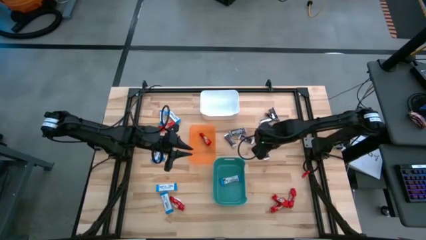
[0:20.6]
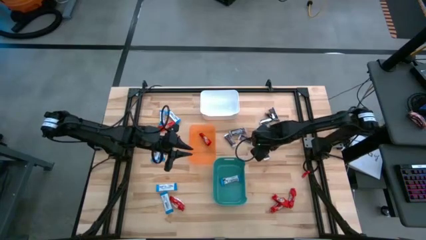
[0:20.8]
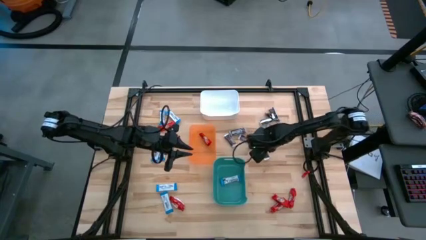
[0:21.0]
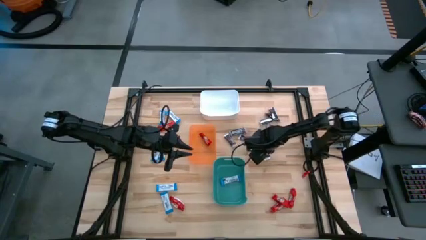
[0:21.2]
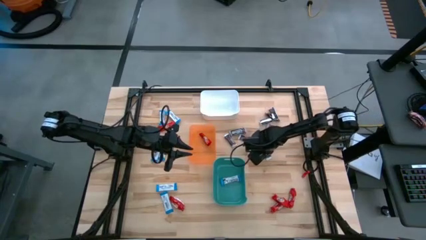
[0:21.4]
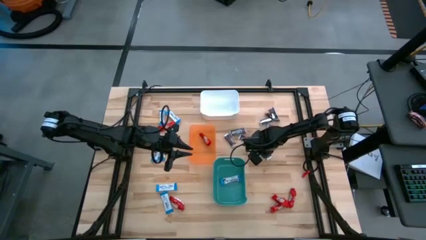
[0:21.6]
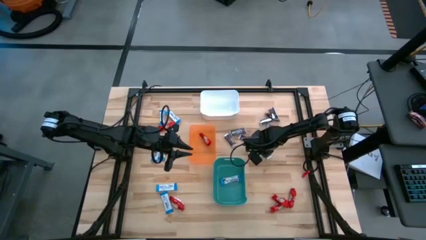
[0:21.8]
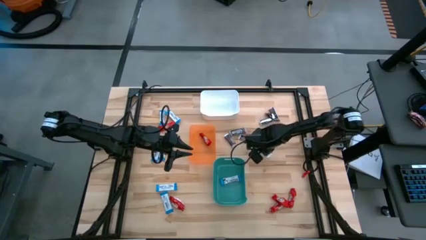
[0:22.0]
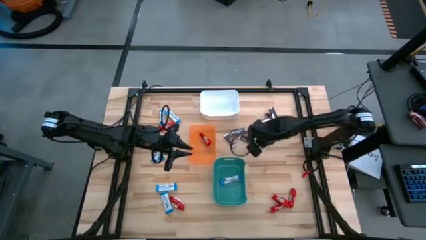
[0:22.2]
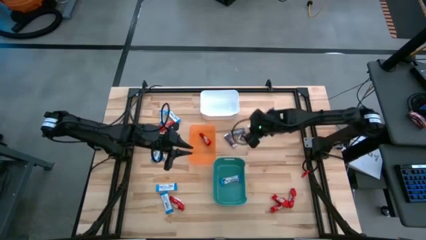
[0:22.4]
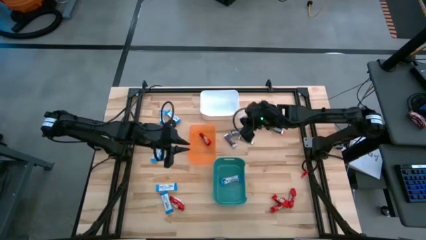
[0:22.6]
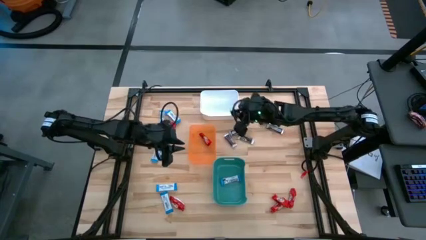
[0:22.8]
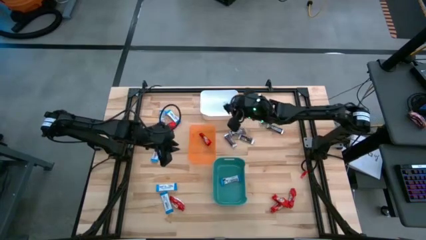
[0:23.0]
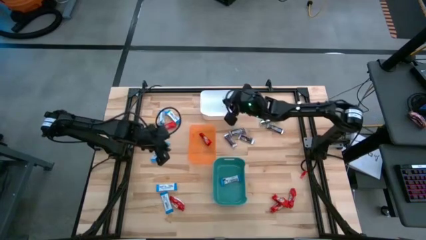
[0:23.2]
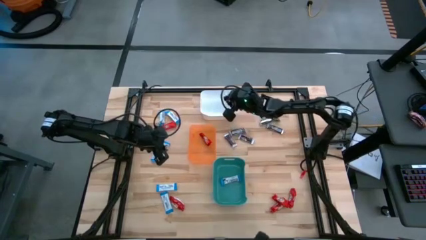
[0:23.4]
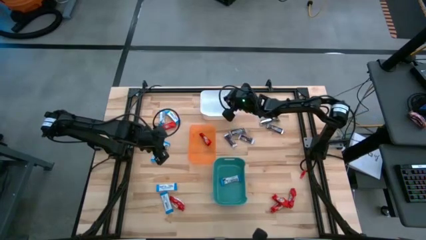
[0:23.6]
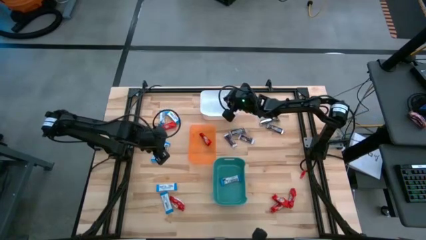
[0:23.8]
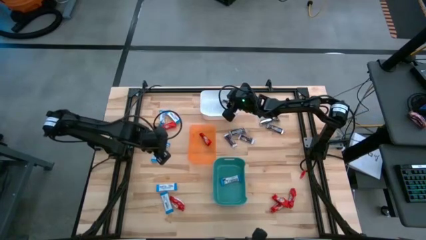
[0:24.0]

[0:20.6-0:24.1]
Task: Sort candy
Put the brown chocolate bar into the white bin

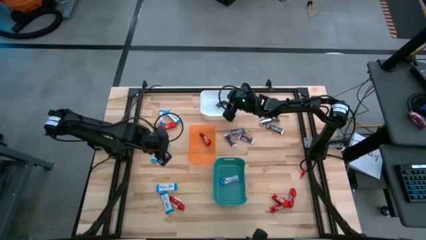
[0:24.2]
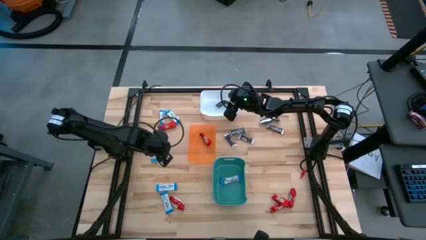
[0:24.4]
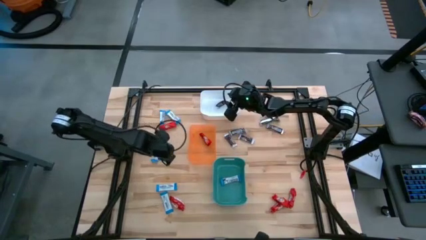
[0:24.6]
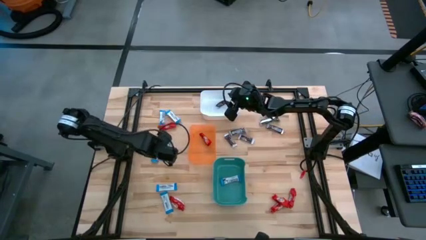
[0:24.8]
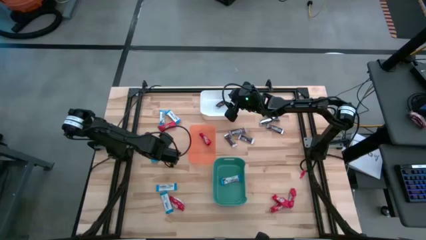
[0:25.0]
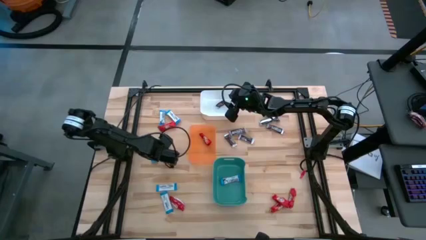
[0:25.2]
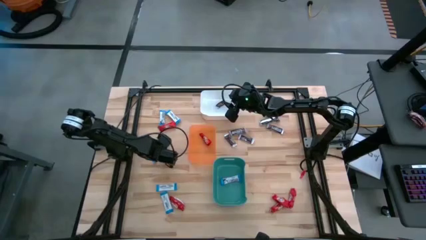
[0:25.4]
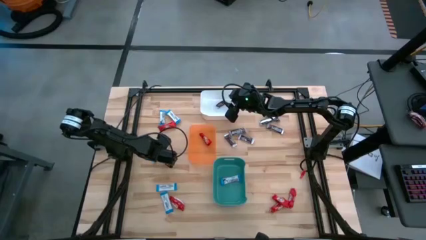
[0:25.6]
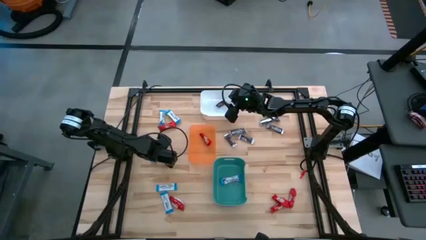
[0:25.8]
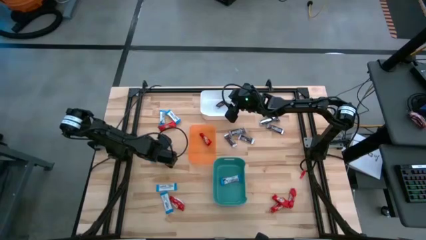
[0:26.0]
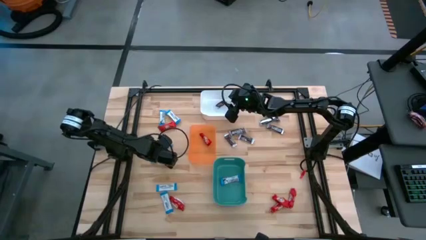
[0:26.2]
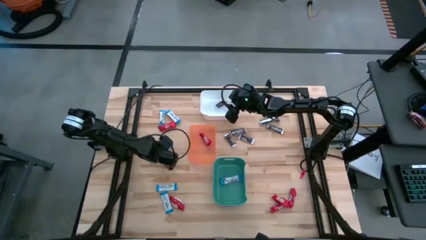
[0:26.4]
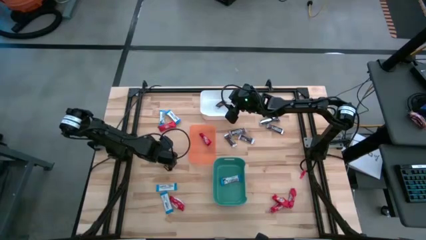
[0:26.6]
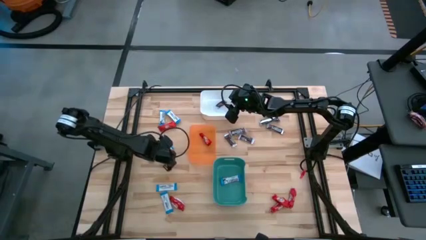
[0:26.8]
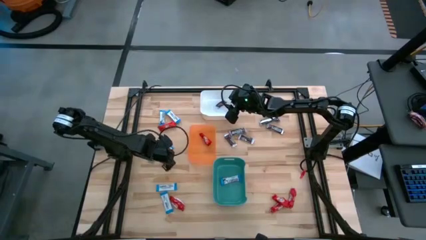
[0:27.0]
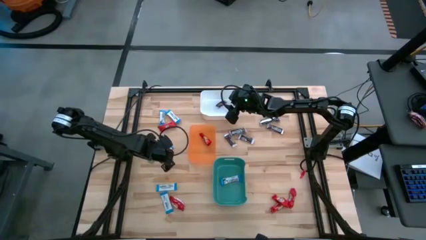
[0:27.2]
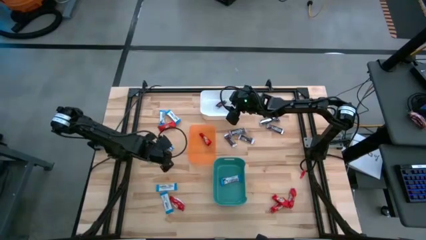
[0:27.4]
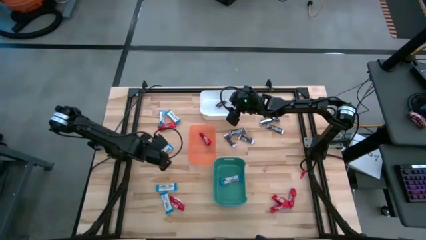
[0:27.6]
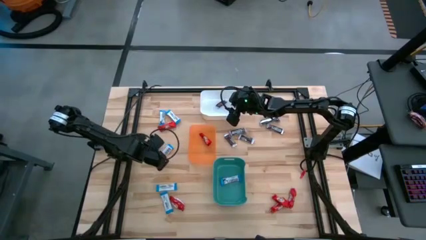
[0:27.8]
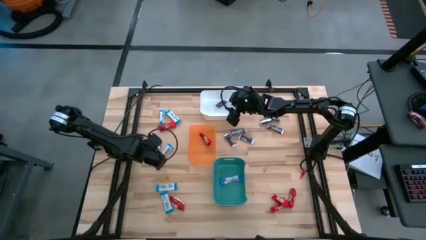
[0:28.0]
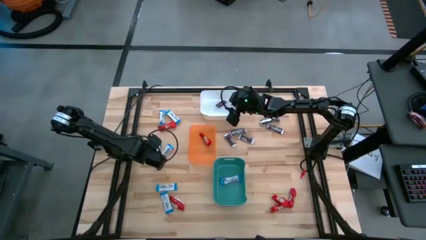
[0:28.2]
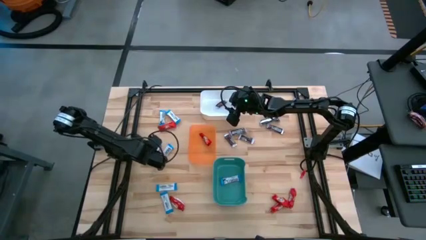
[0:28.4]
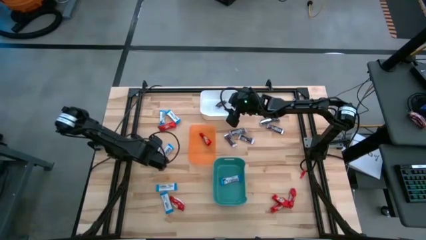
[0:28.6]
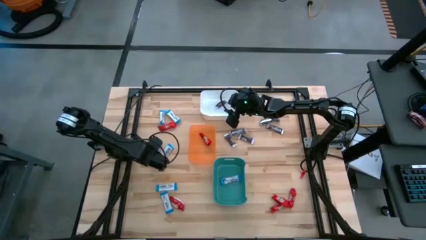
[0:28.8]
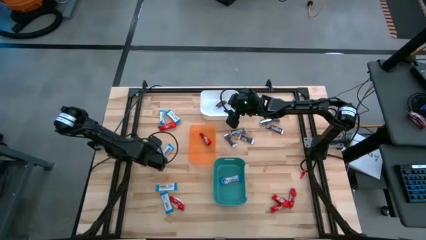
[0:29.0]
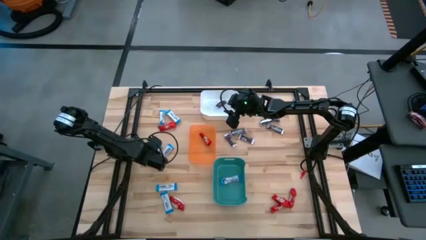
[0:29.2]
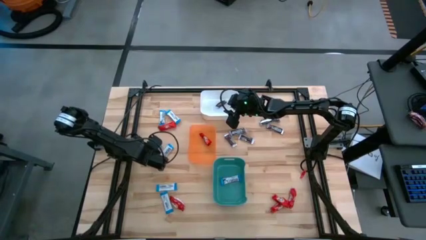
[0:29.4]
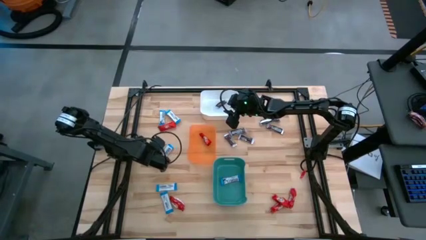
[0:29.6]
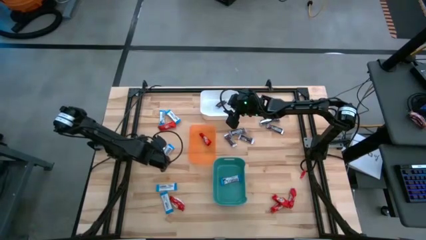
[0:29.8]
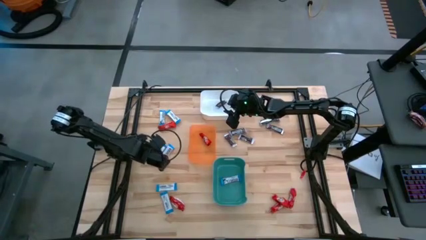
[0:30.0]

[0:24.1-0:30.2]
Put the white chocolate bar into the green bin

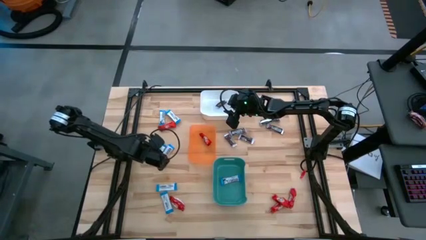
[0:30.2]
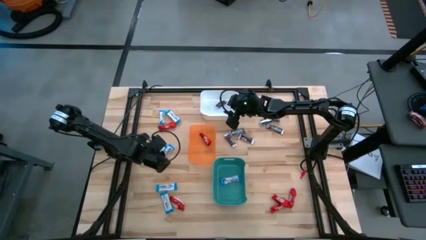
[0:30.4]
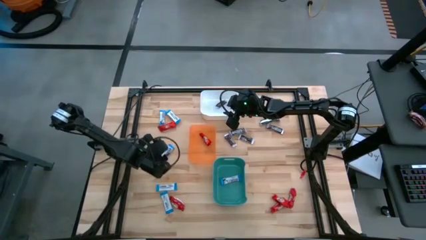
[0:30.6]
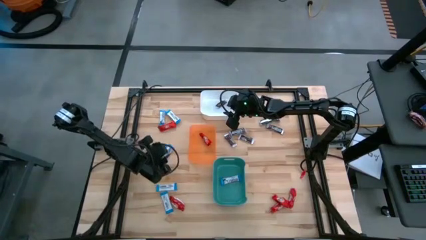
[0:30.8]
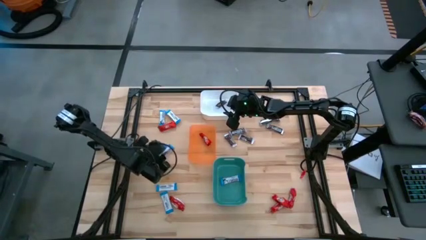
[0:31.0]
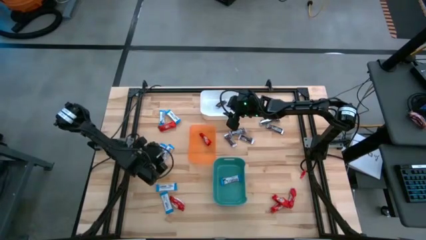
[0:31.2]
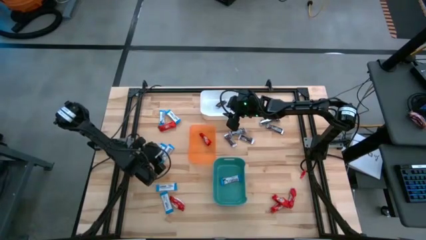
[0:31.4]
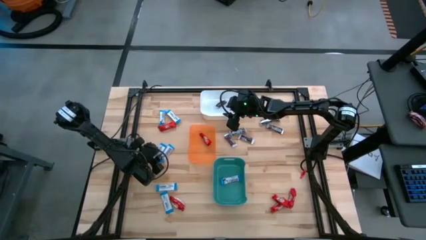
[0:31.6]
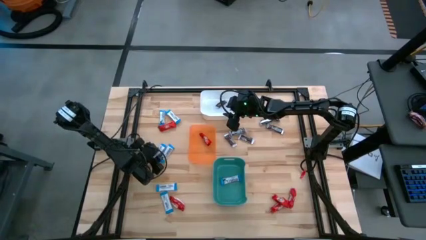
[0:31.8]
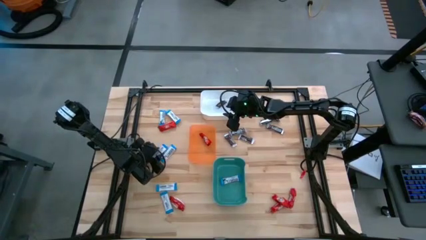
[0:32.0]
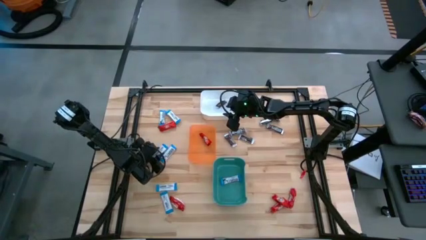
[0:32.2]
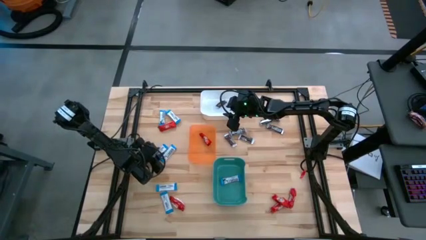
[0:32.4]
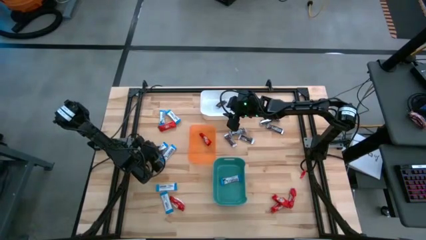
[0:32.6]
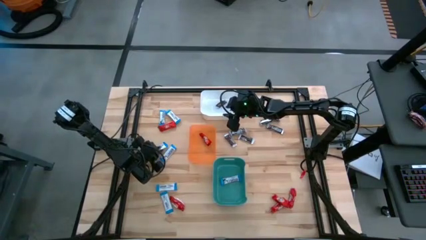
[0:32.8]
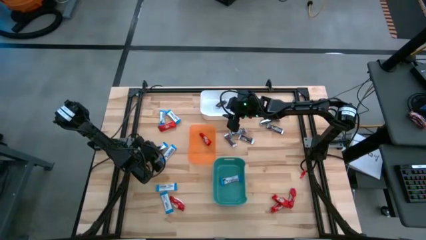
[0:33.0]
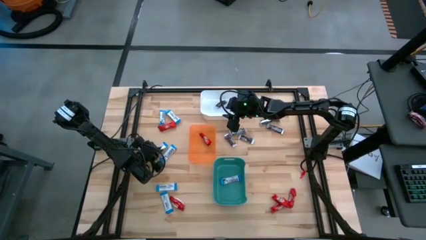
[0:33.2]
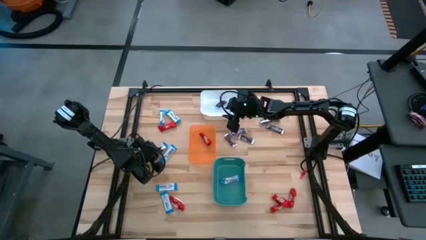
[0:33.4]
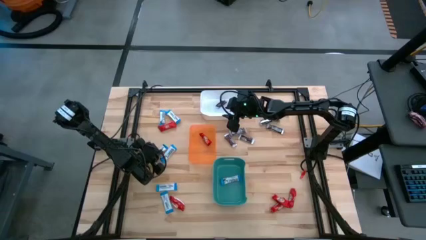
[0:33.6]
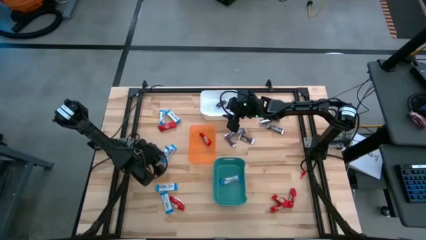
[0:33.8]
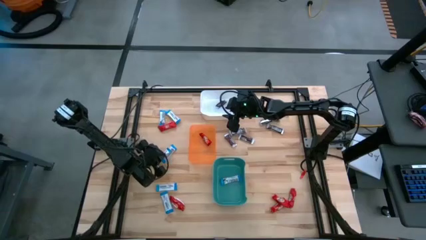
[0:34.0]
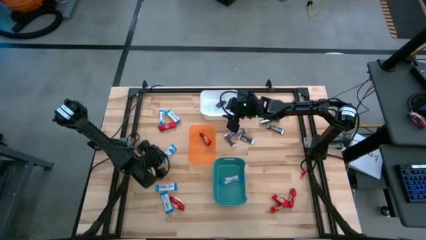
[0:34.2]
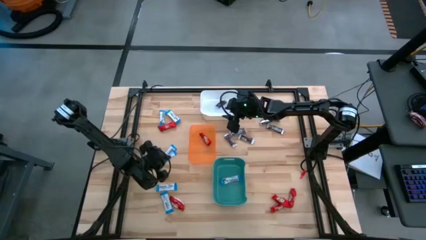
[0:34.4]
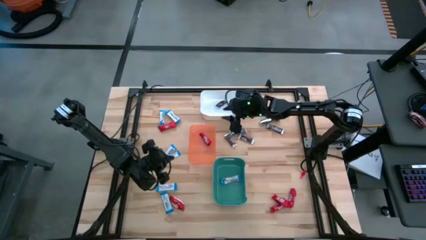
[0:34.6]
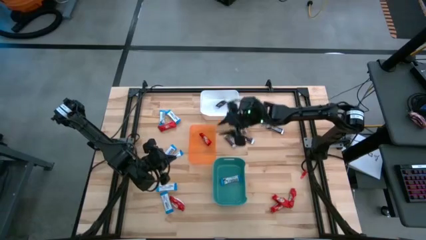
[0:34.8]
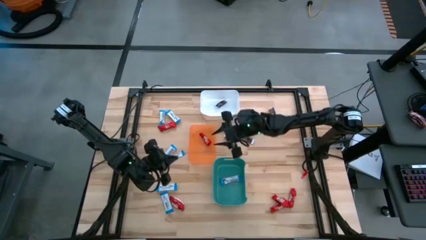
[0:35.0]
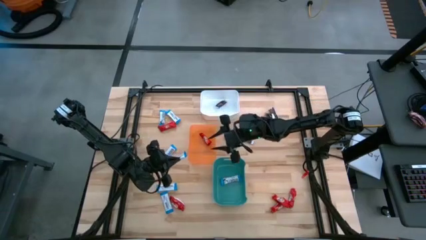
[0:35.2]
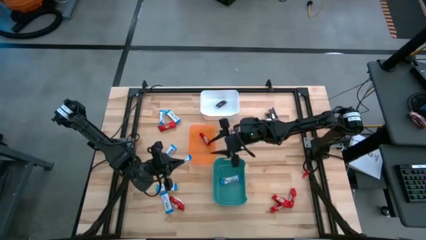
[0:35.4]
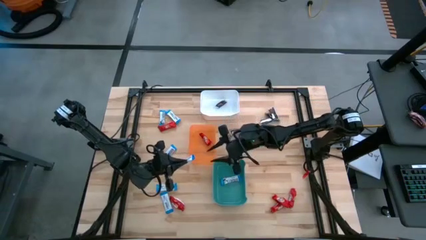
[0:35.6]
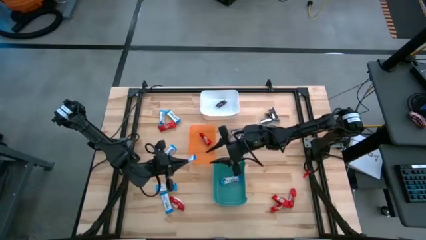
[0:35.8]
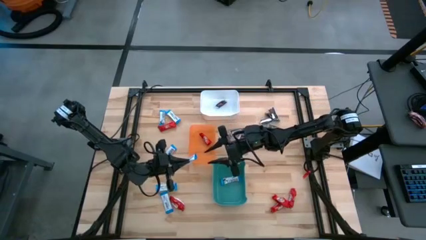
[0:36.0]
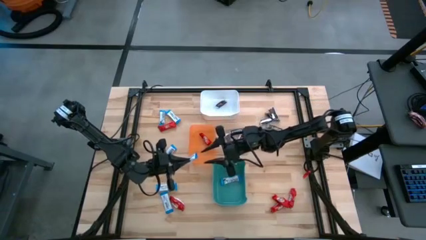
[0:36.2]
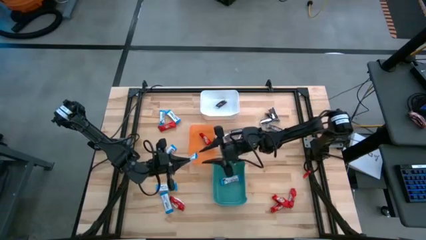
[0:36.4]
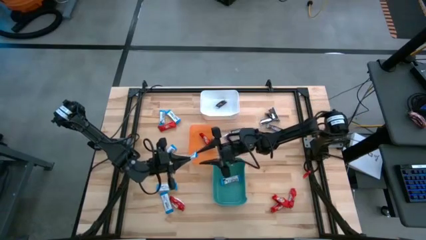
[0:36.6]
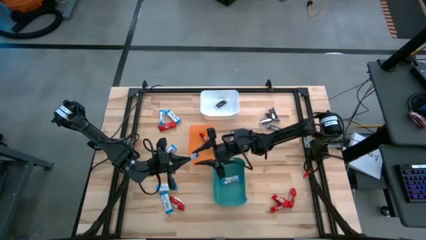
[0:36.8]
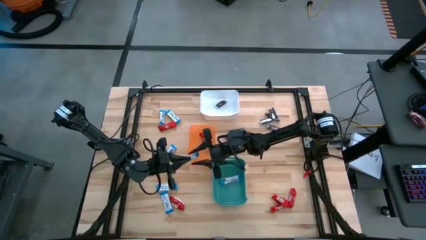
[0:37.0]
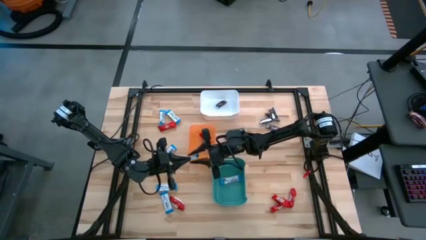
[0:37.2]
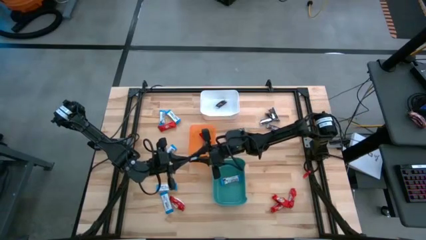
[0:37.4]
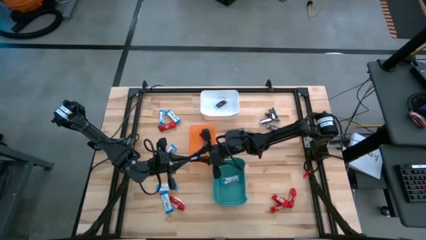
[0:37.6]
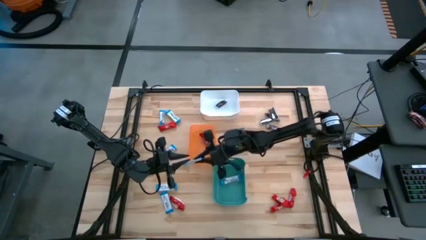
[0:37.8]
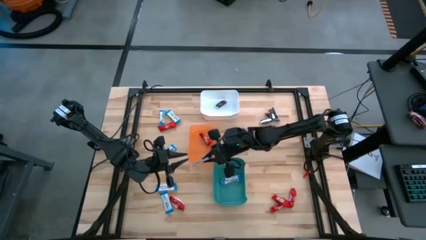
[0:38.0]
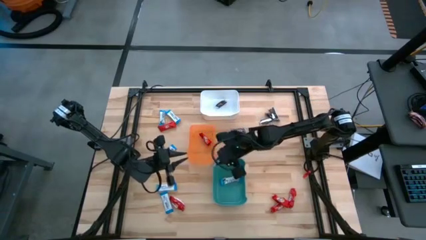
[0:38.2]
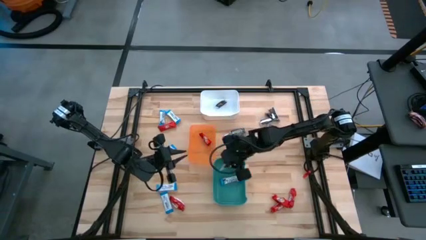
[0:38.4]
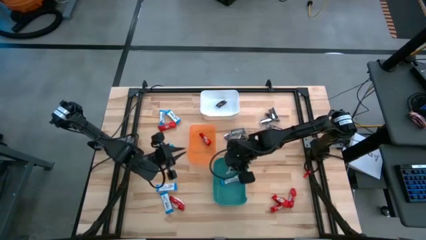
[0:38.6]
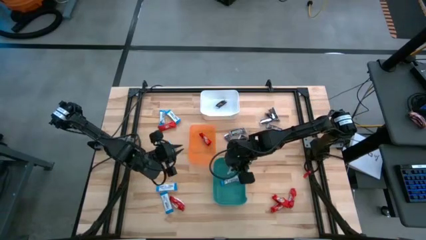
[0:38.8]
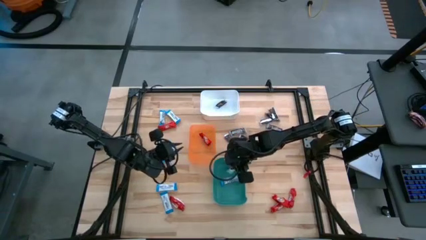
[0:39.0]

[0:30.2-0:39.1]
Put the white chocolate bar into the green bin
